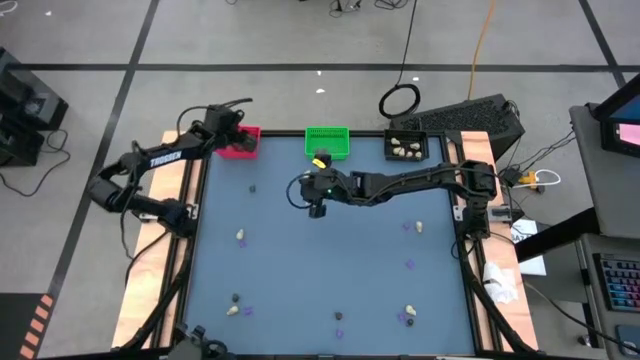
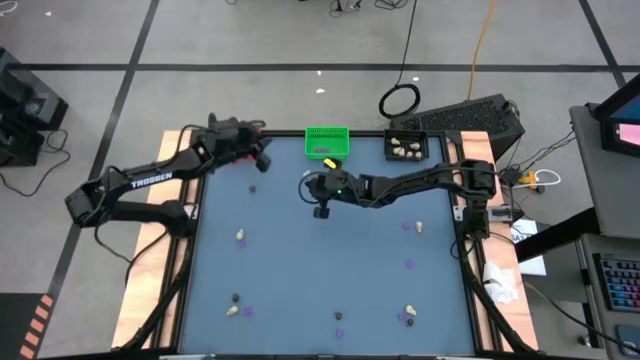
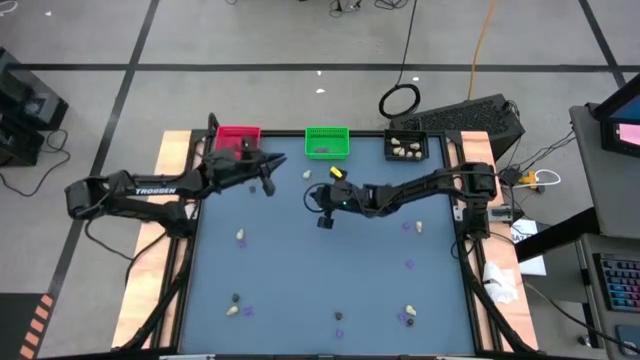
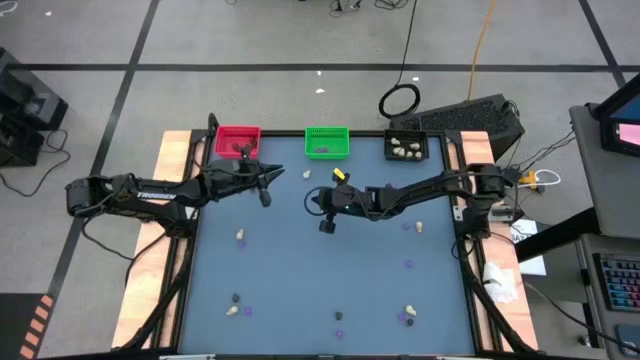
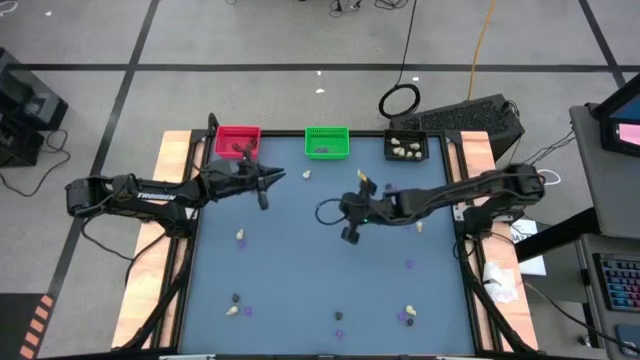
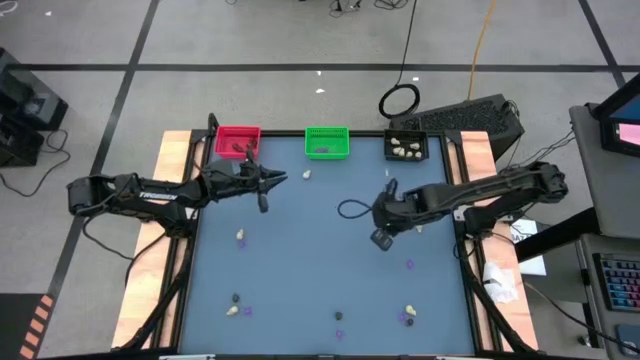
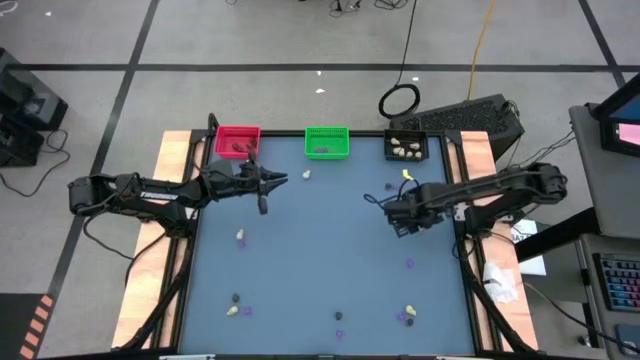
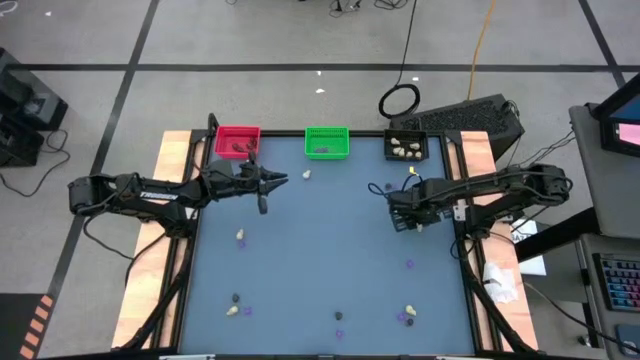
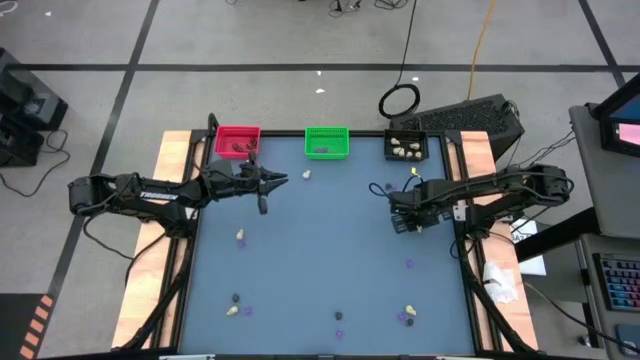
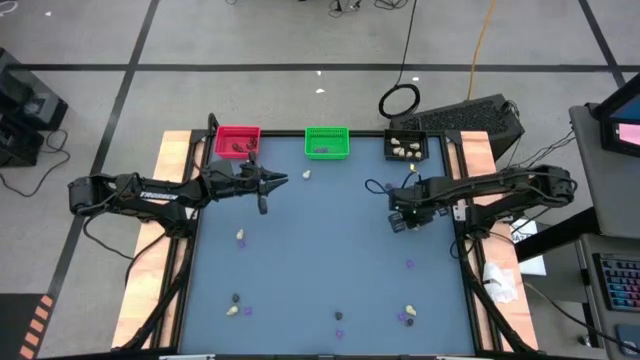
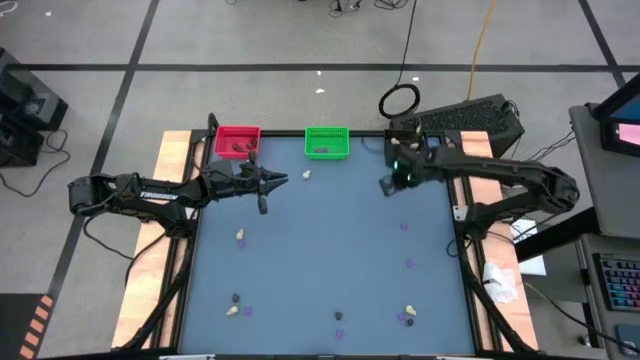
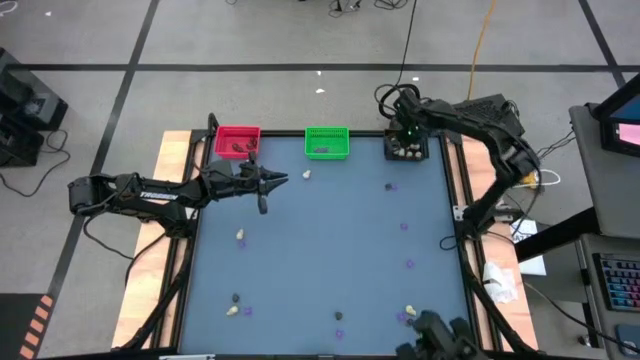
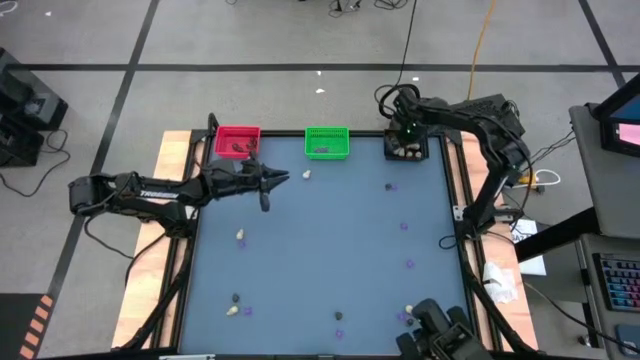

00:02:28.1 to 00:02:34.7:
Task: Sort Halloween decoration
Put the white skull toy into the black bin

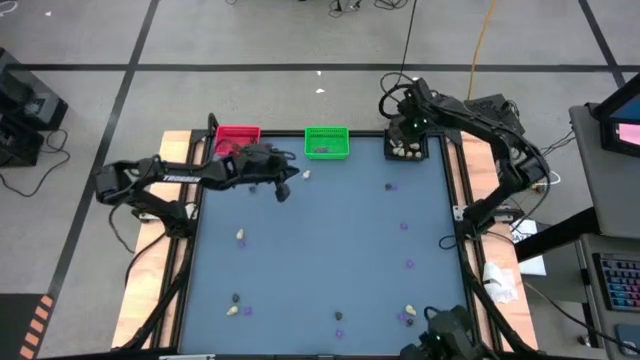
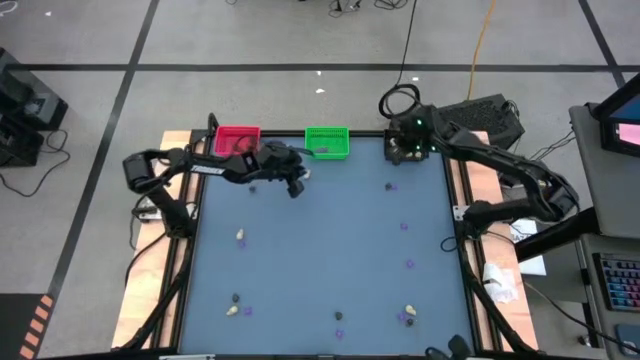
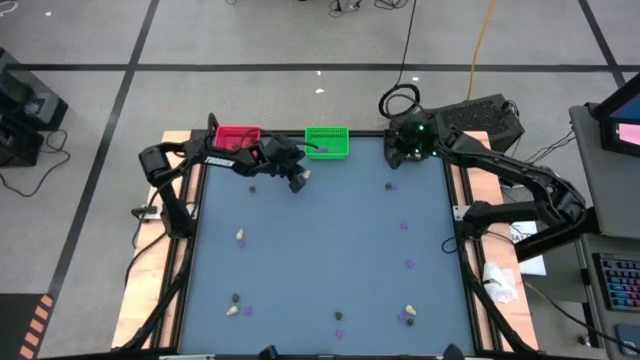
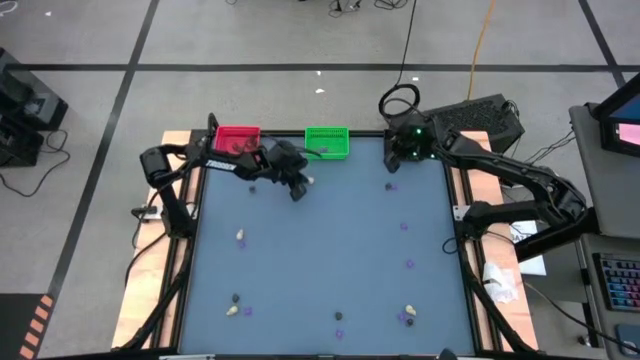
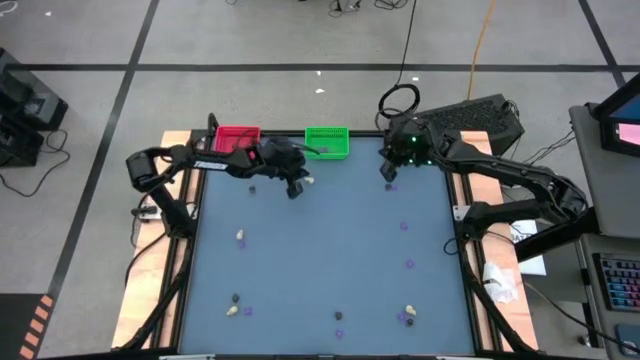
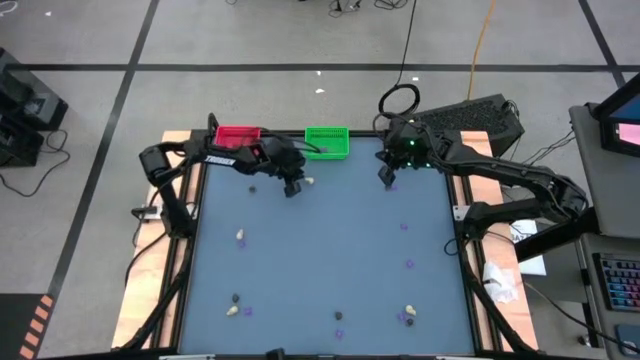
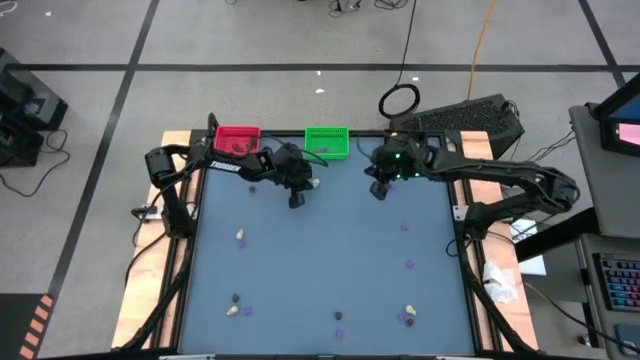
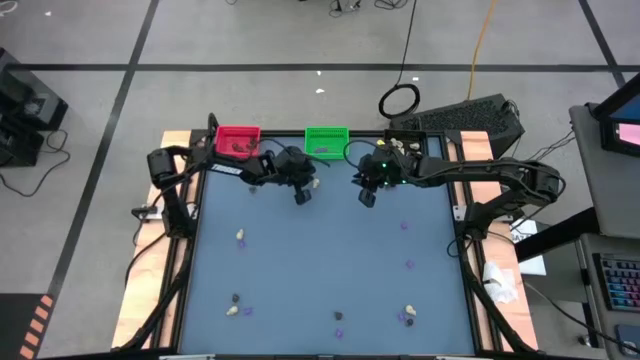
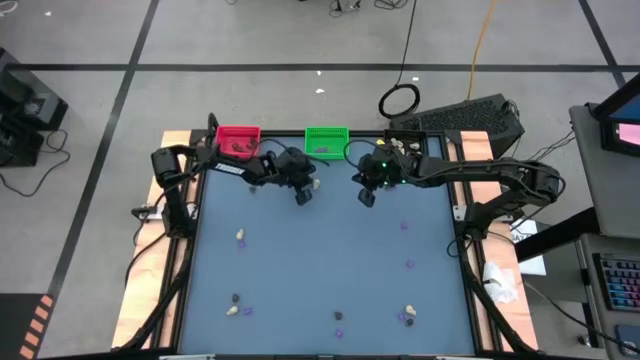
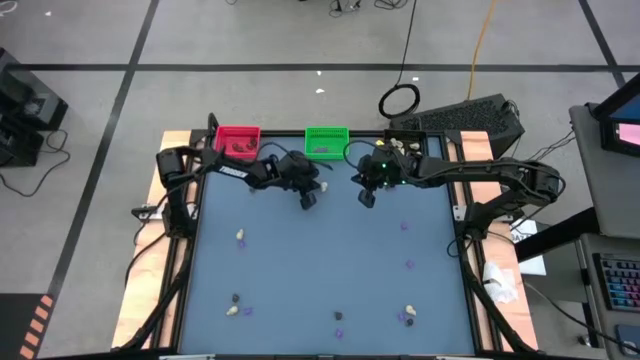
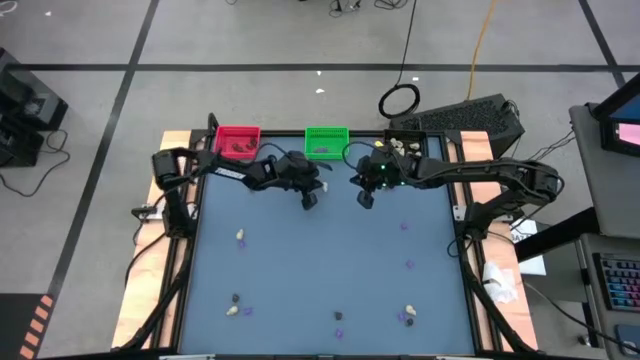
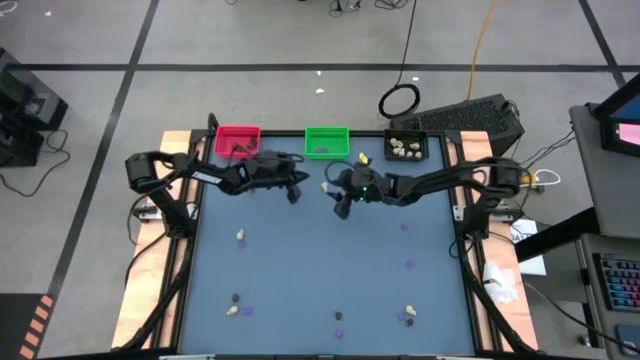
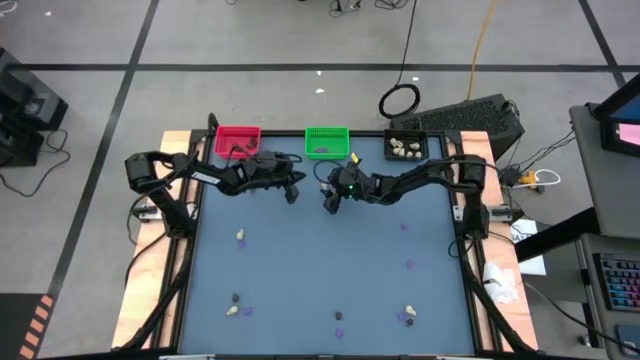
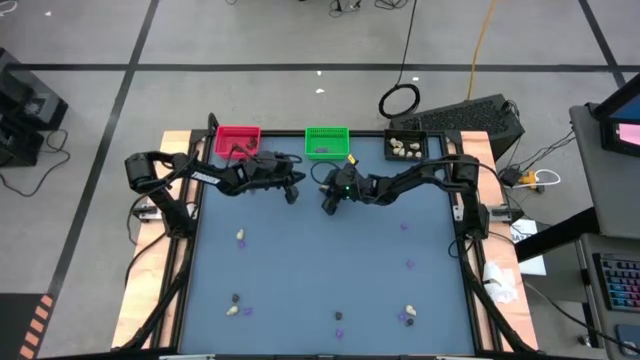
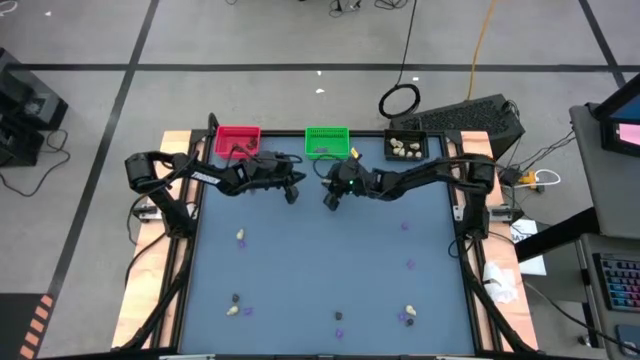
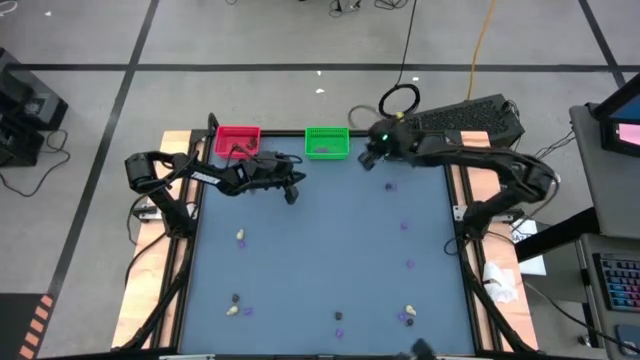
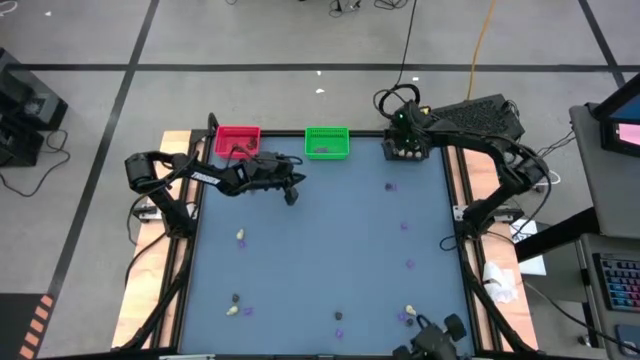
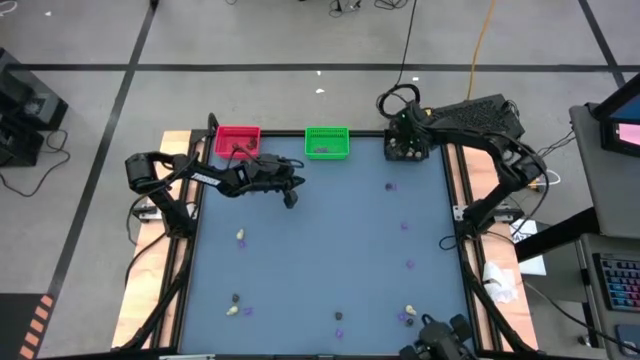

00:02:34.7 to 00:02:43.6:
Put the white skull toy into the black bin

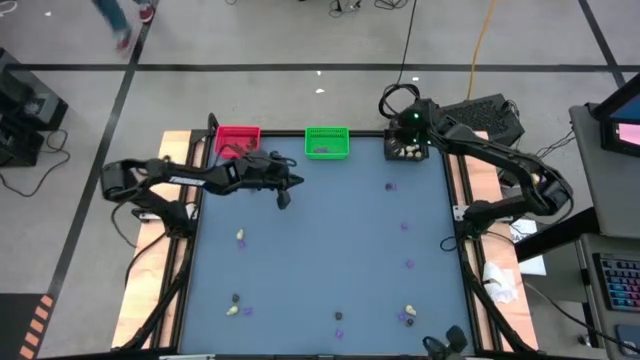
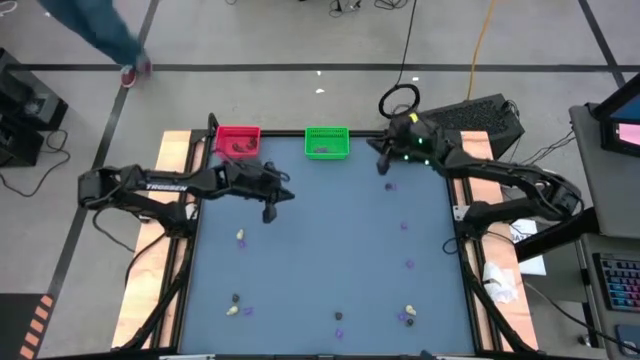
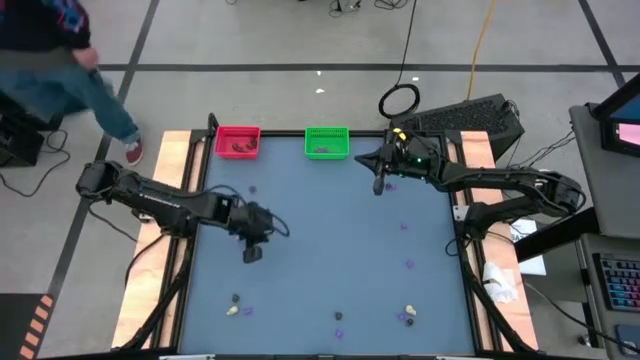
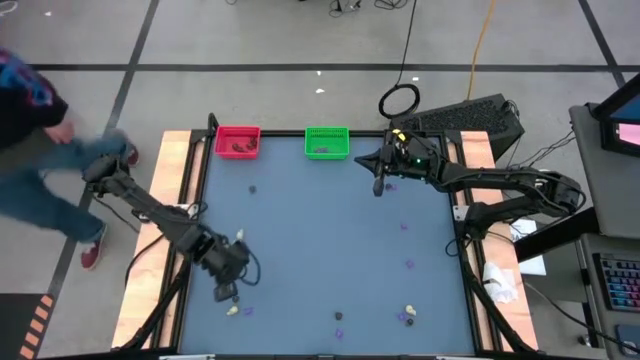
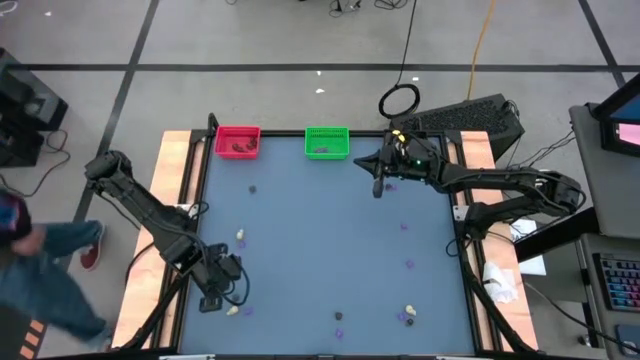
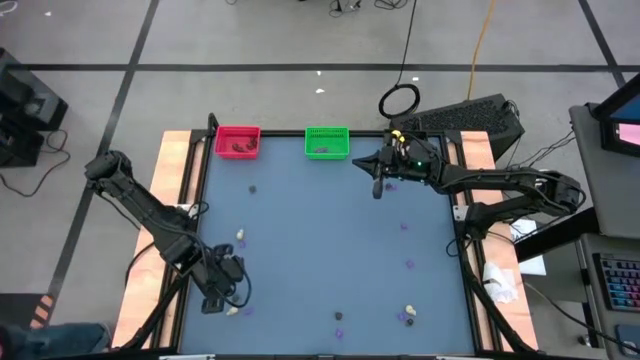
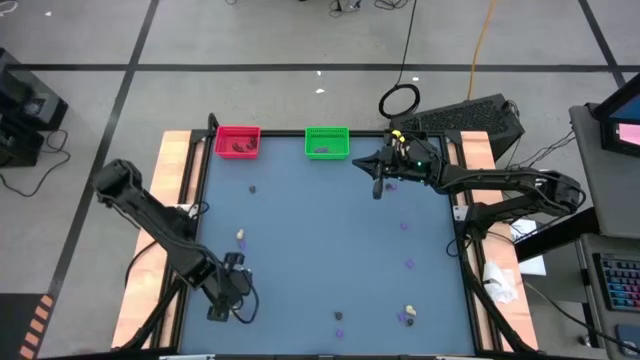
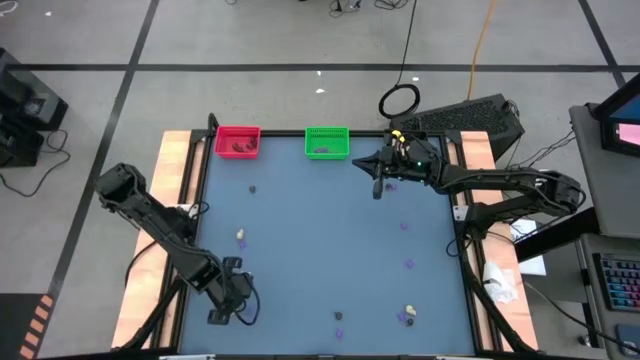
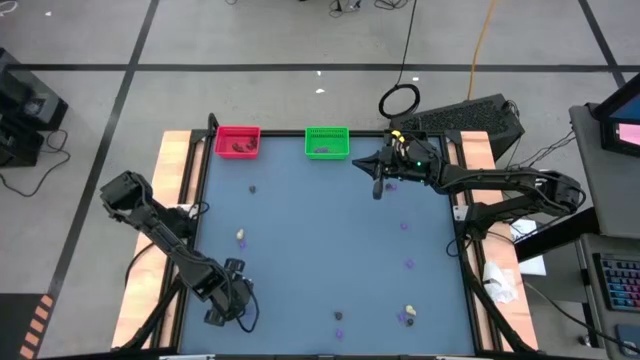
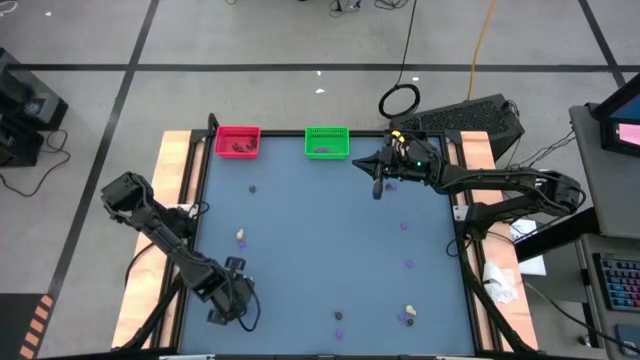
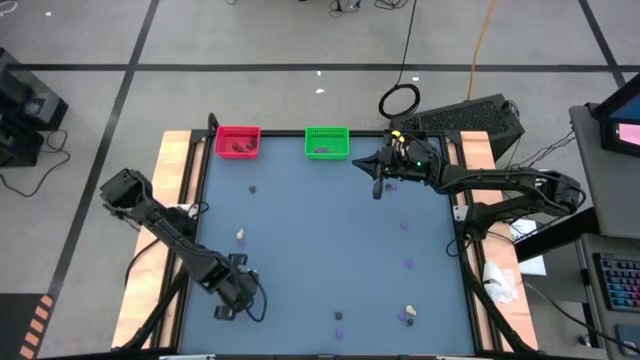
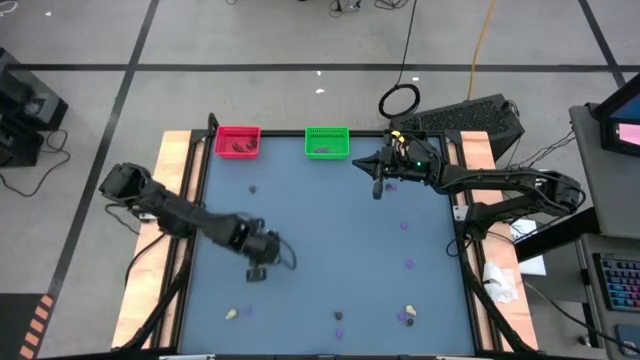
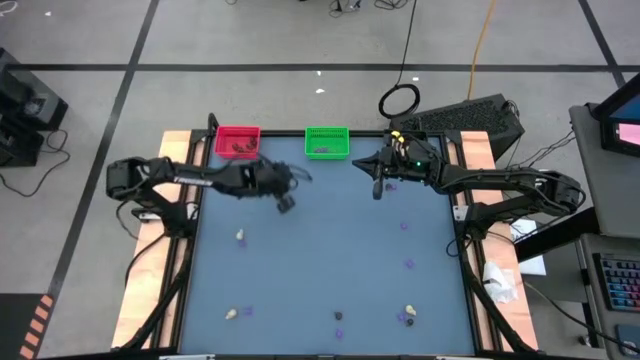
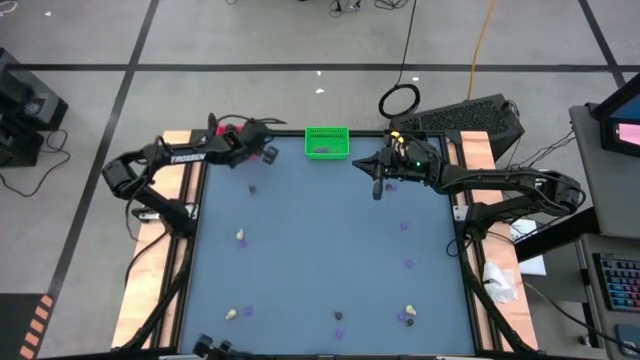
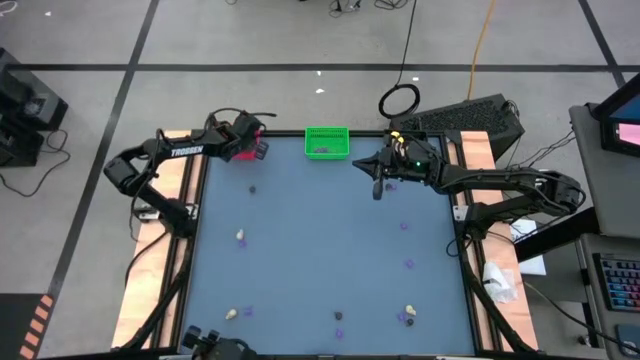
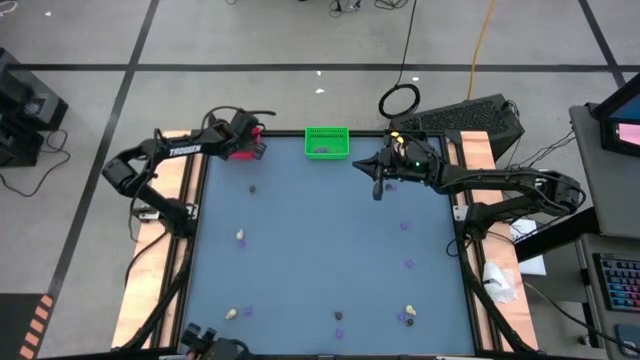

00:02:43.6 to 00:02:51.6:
Put the black skull toy into the red bin
